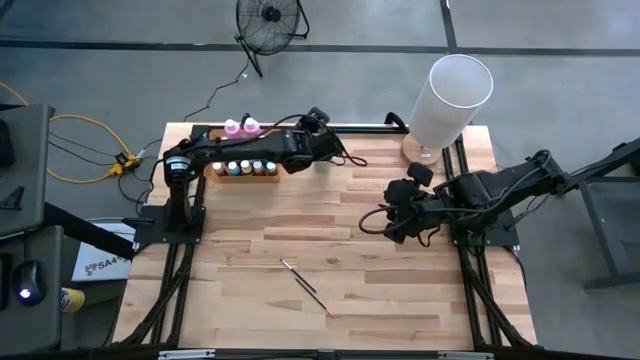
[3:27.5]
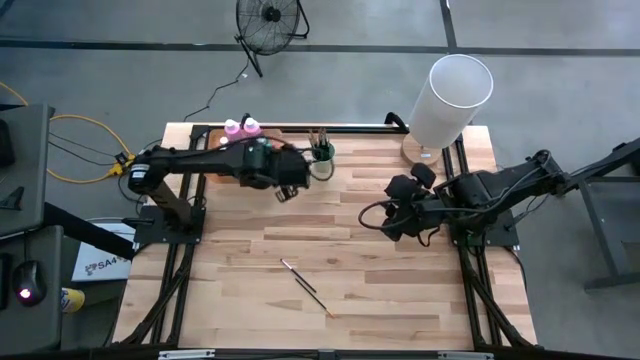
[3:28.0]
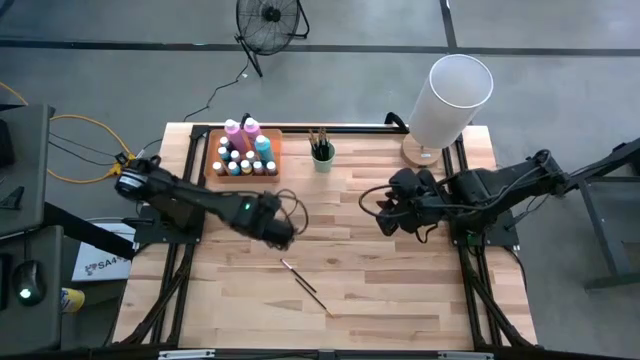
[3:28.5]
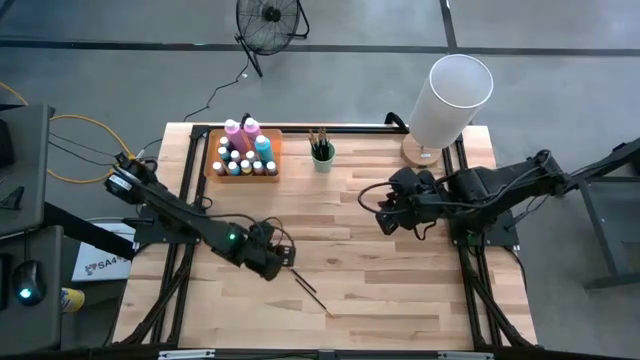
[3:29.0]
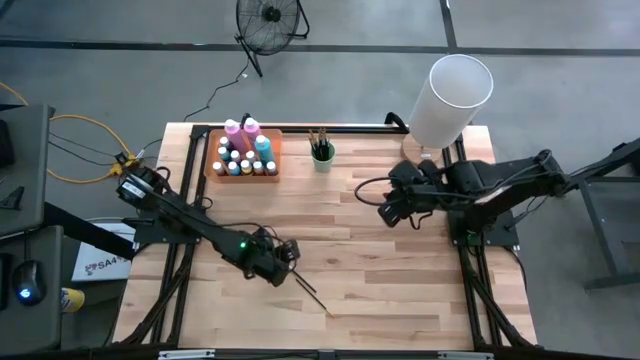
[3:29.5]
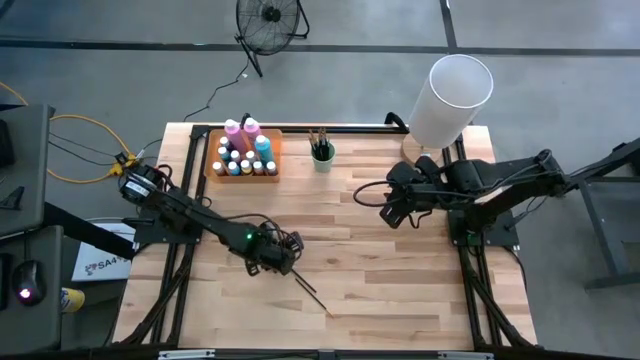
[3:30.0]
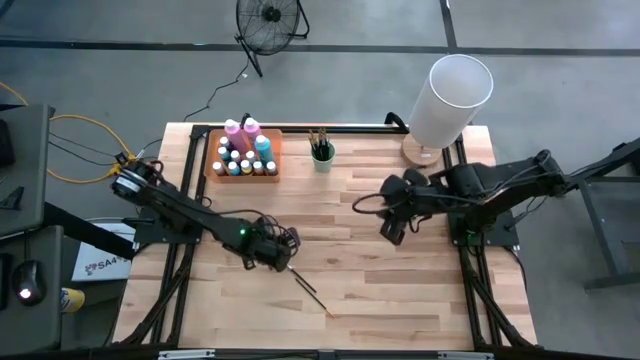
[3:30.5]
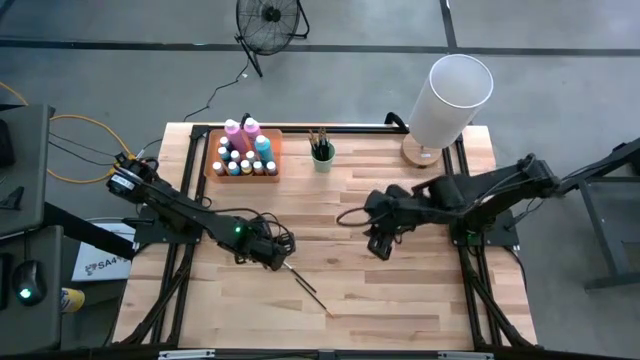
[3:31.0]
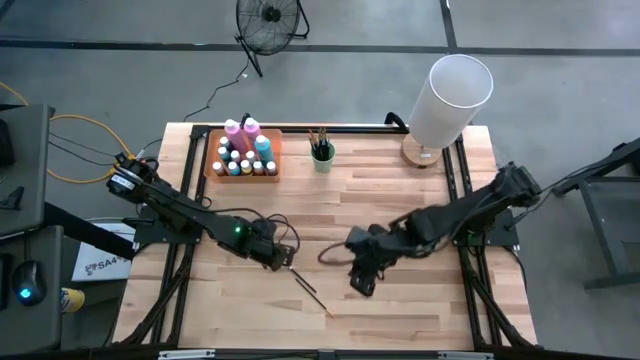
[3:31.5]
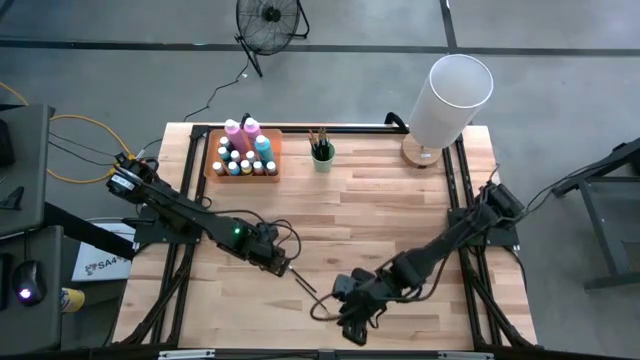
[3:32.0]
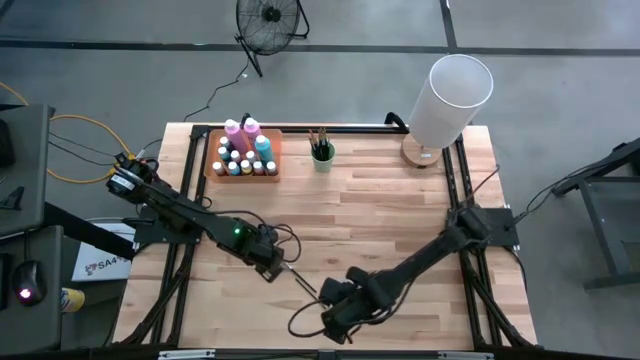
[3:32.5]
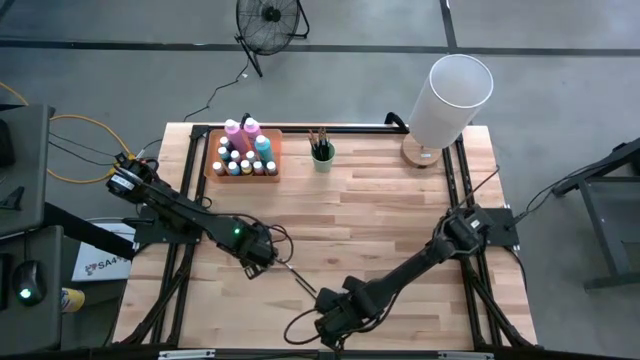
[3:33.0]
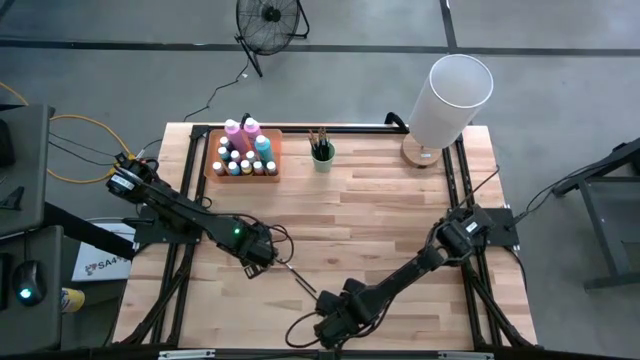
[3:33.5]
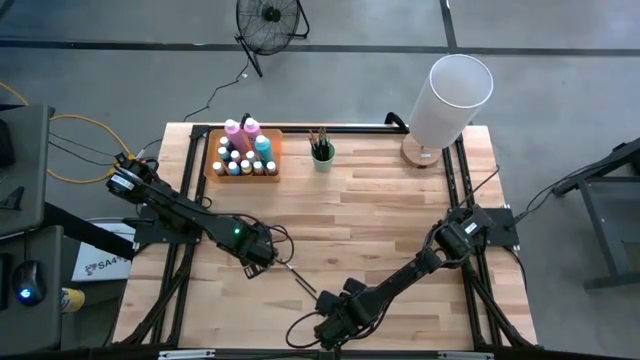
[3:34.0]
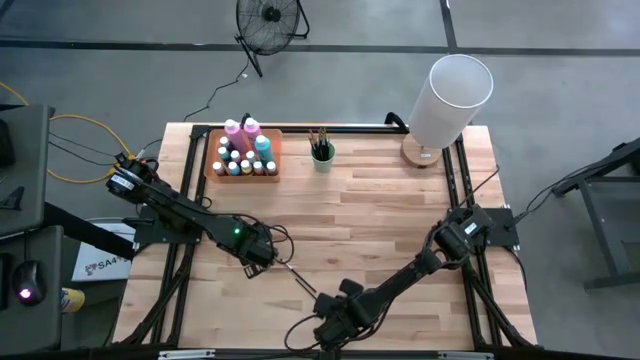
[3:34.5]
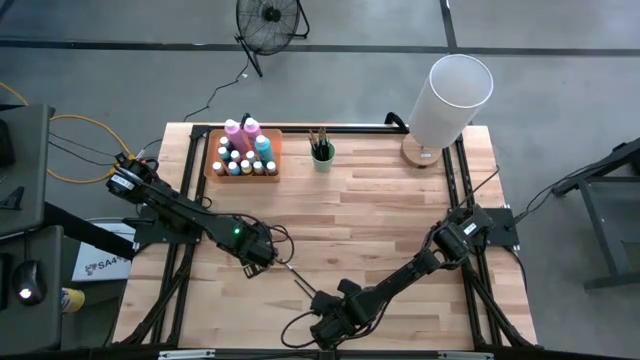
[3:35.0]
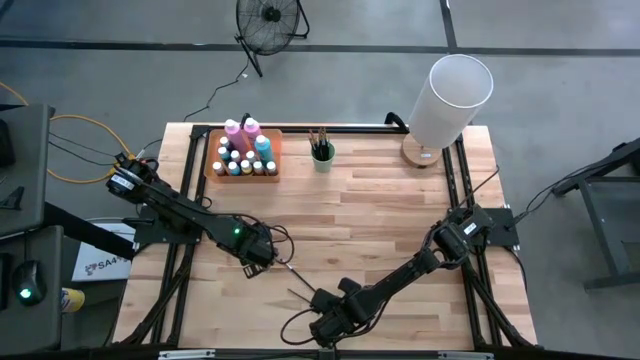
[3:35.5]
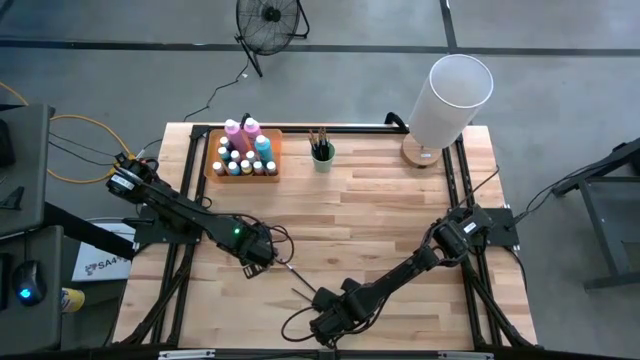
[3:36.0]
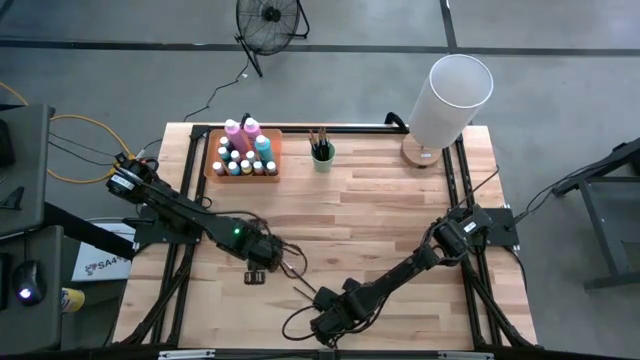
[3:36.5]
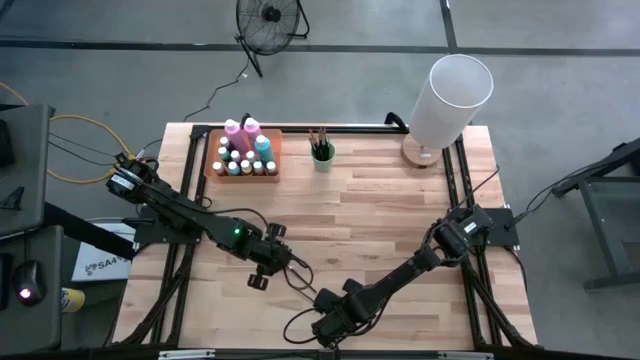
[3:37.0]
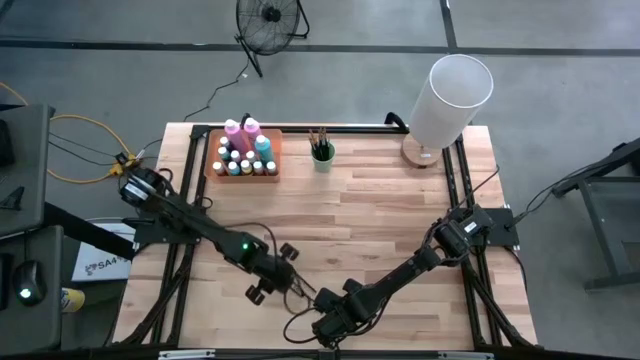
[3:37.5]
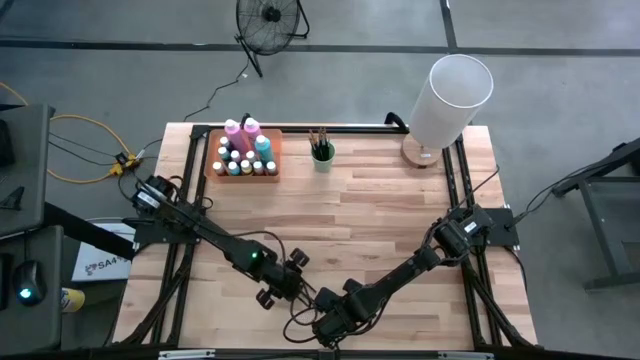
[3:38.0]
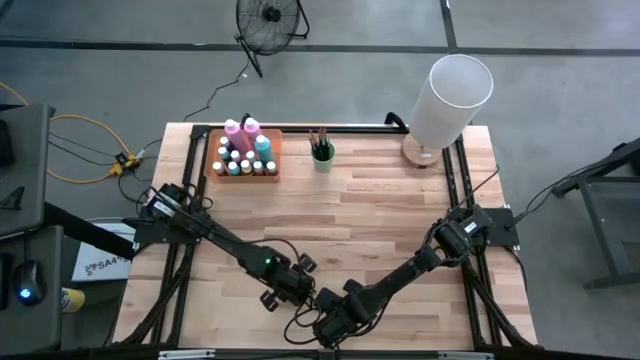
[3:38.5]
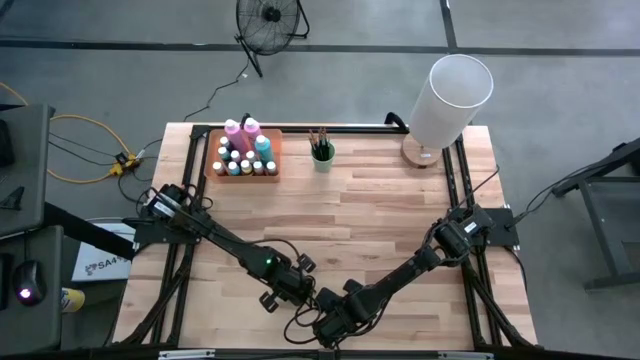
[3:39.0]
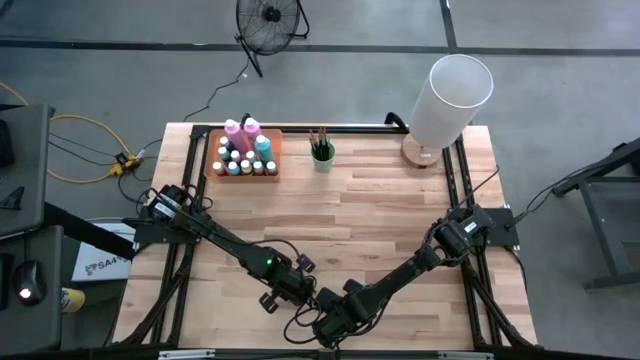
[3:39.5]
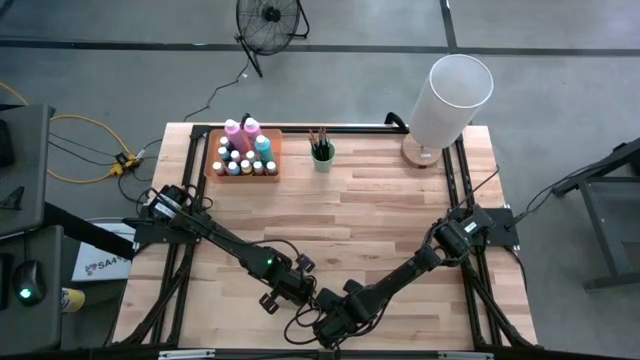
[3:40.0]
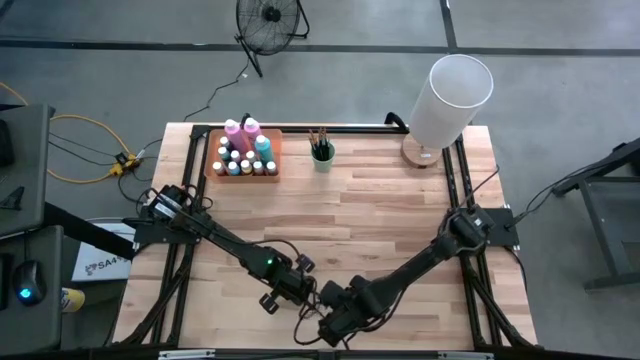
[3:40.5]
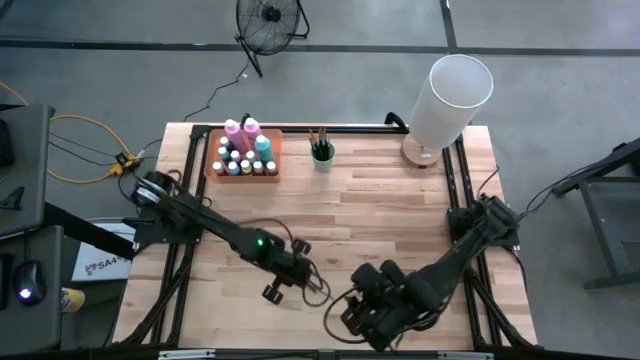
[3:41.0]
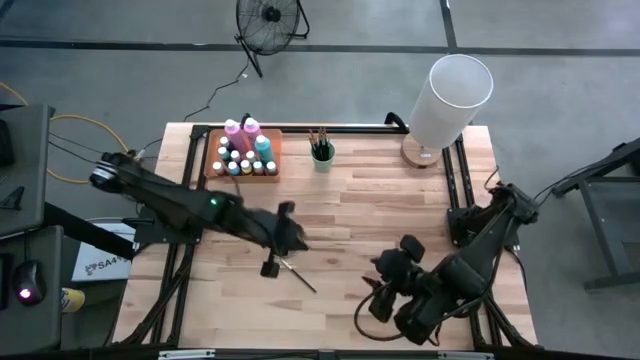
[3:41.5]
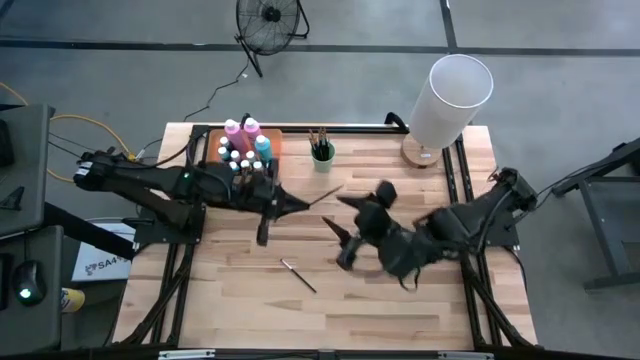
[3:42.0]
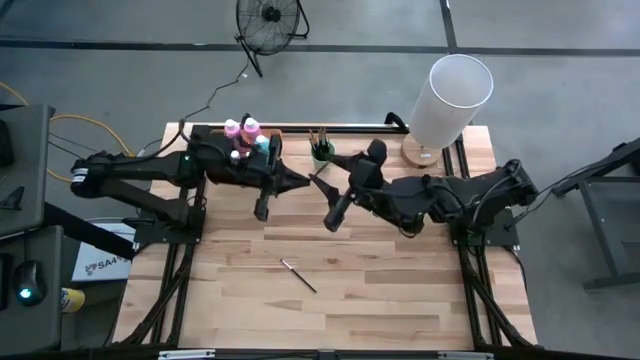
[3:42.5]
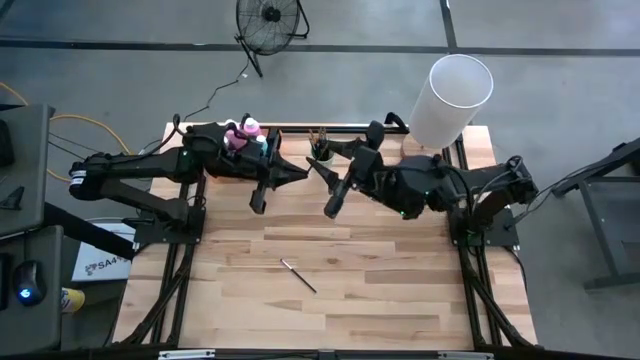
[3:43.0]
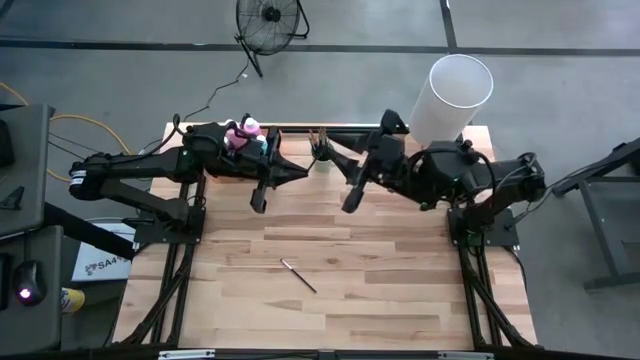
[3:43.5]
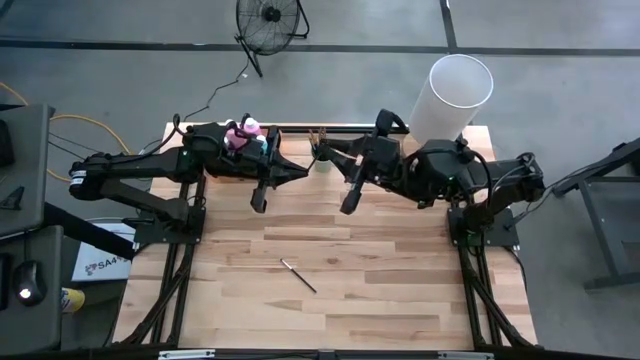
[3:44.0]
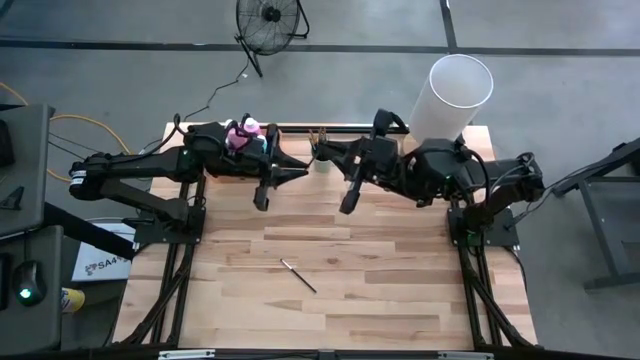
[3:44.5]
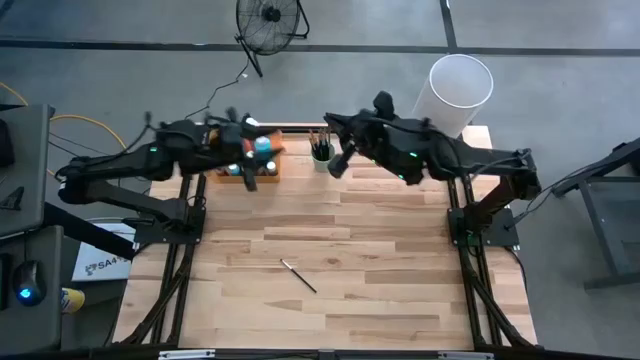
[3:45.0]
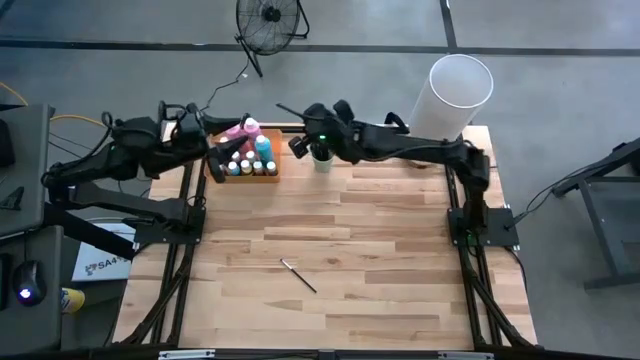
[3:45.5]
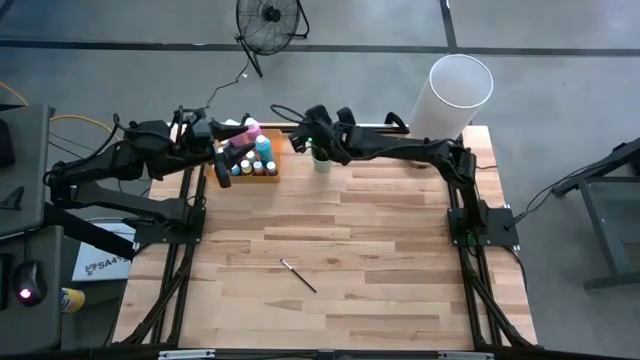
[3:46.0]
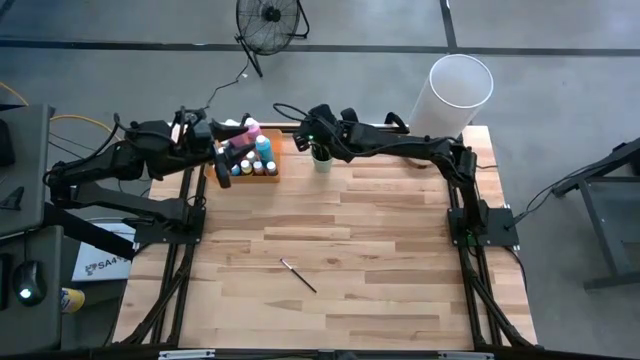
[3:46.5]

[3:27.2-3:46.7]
Task: Pick & Place Paint Supplies
Put the black paint brush into the green cup

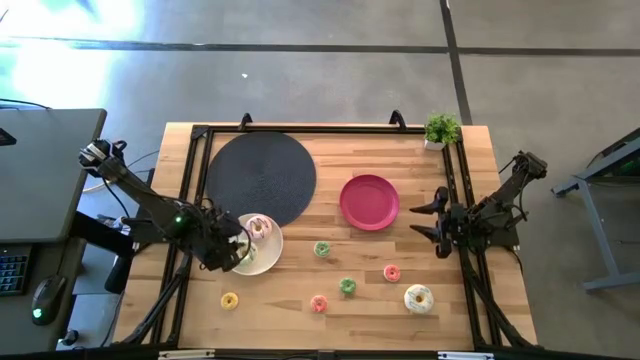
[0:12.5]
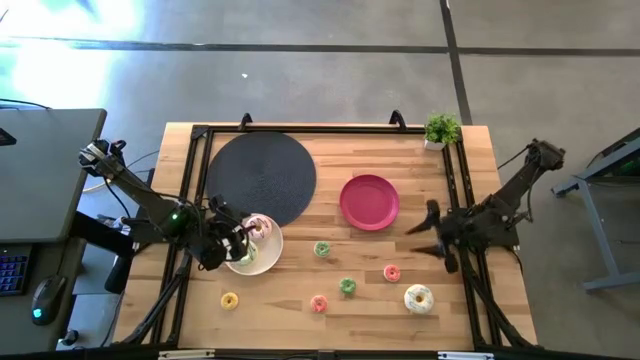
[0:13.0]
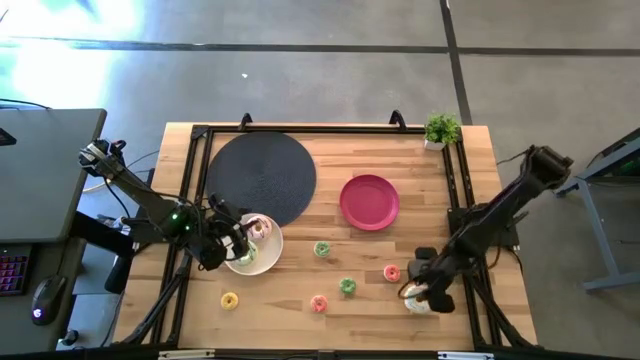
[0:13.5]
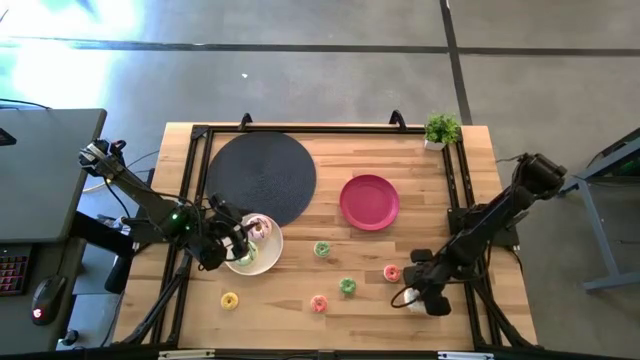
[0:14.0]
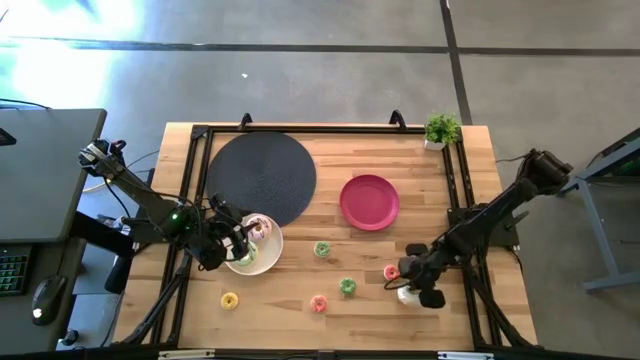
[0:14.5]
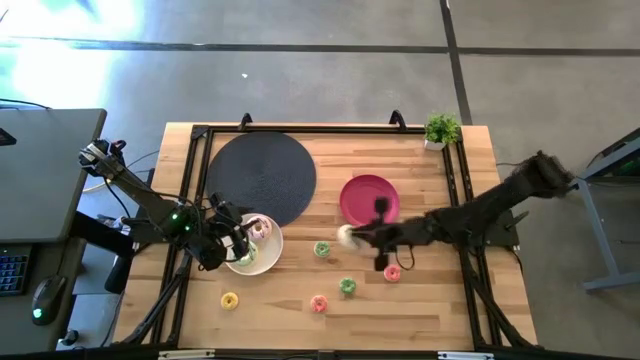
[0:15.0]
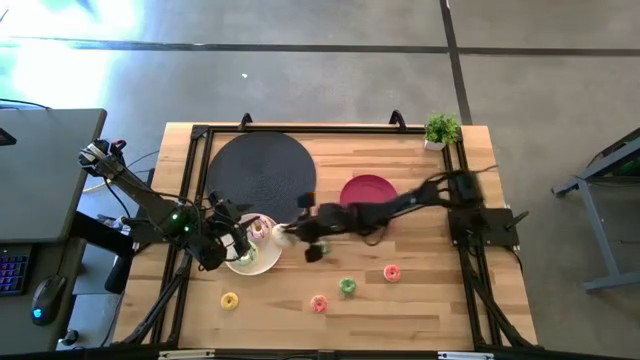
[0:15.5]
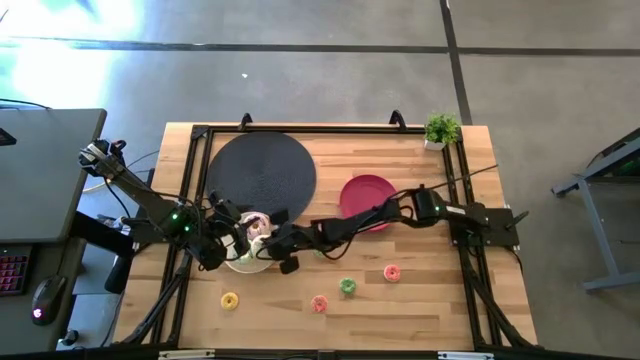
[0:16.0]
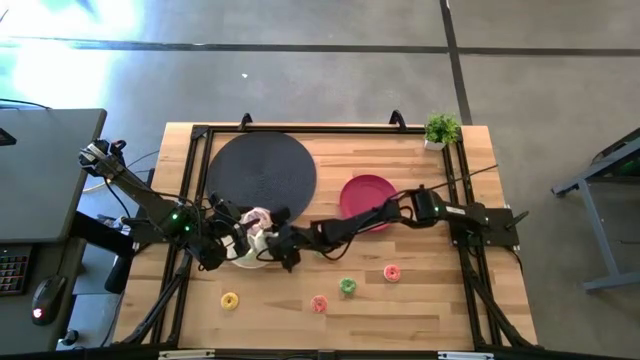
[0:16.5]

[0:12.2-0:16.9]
Task: Pick & Place donuts
Put the big white donut on the white plate
